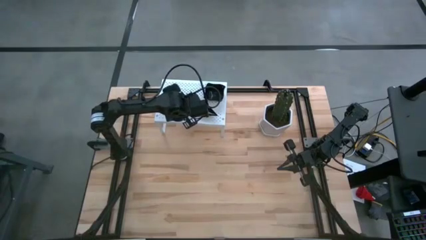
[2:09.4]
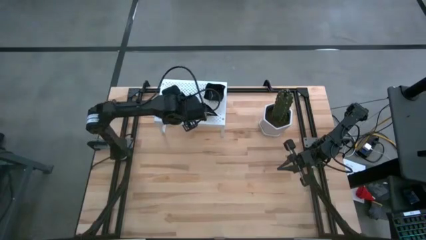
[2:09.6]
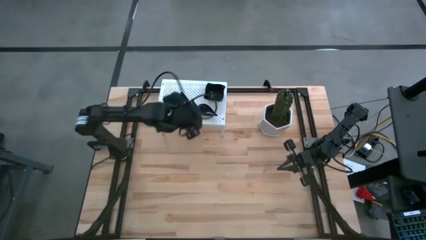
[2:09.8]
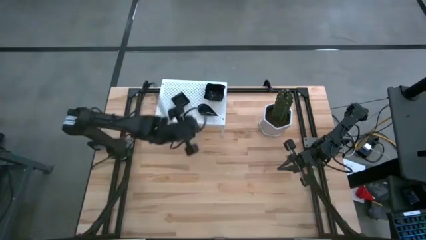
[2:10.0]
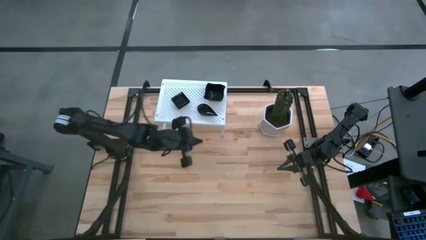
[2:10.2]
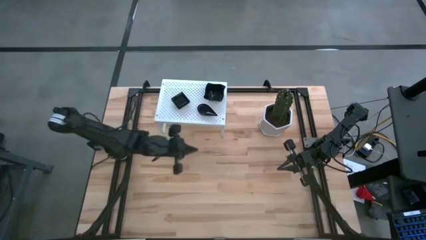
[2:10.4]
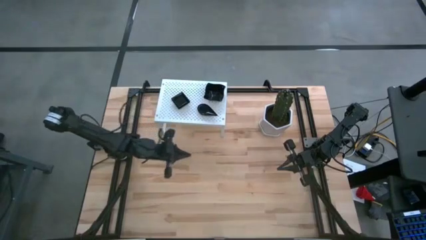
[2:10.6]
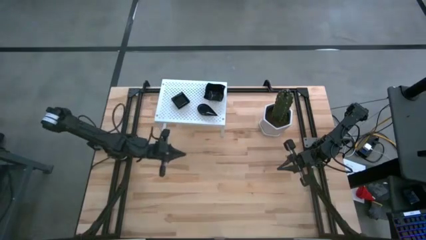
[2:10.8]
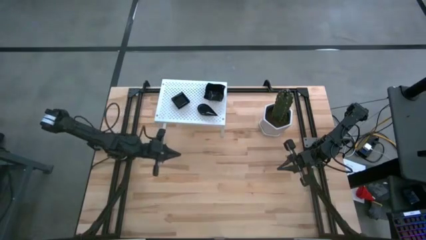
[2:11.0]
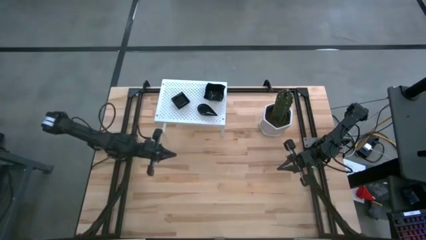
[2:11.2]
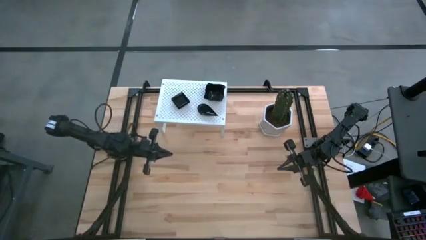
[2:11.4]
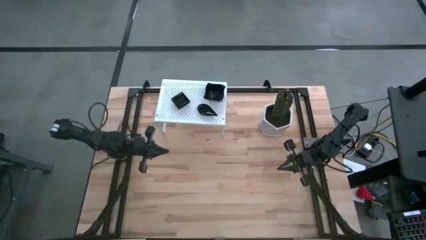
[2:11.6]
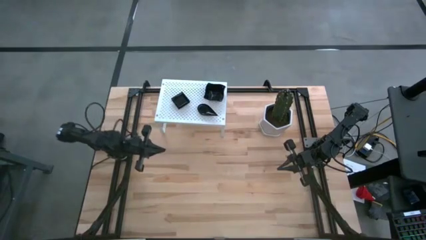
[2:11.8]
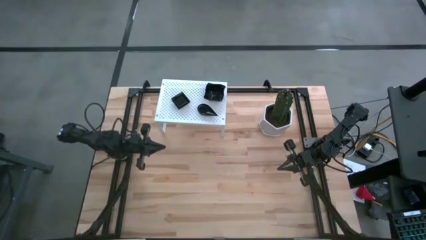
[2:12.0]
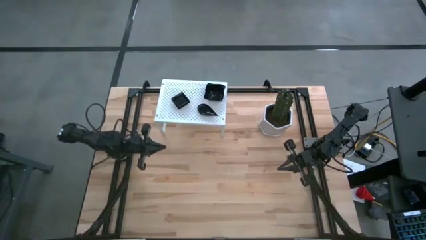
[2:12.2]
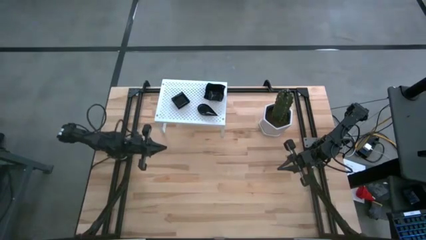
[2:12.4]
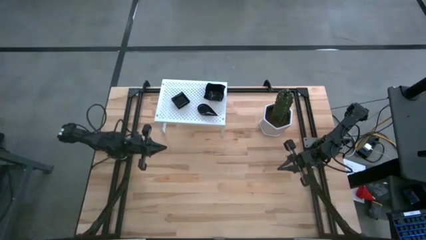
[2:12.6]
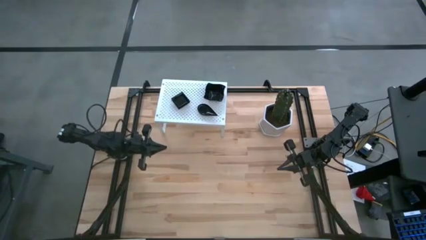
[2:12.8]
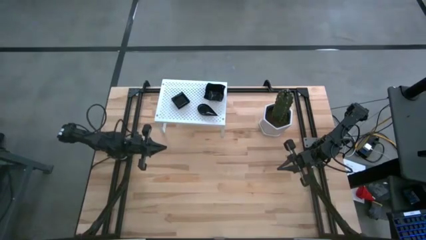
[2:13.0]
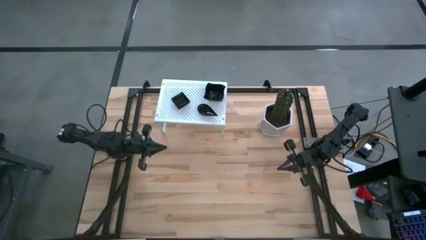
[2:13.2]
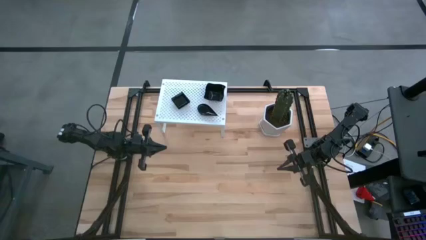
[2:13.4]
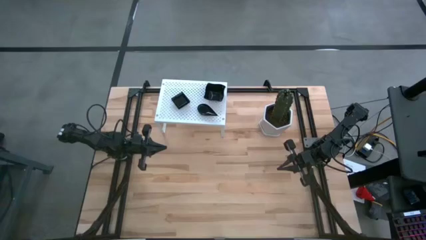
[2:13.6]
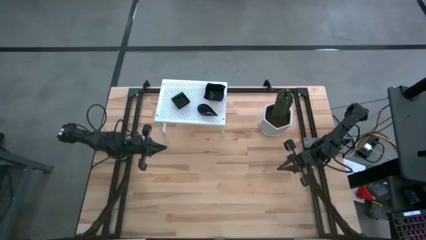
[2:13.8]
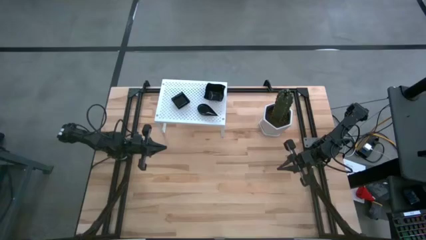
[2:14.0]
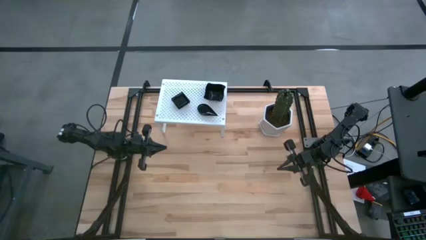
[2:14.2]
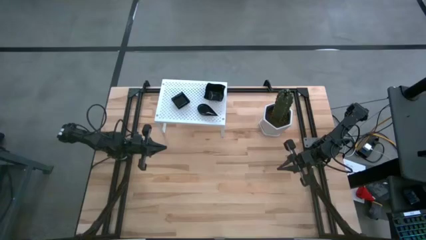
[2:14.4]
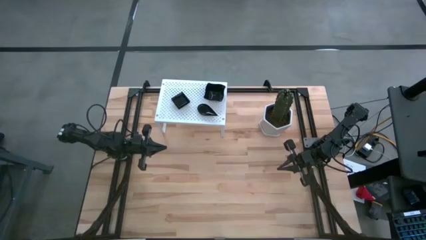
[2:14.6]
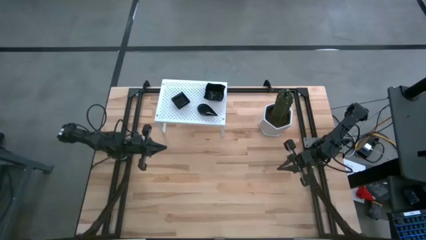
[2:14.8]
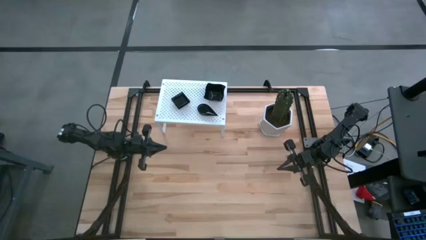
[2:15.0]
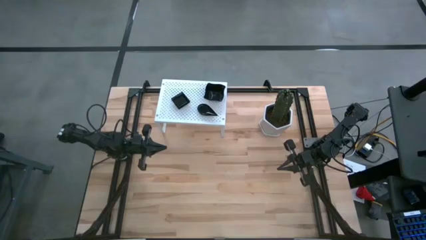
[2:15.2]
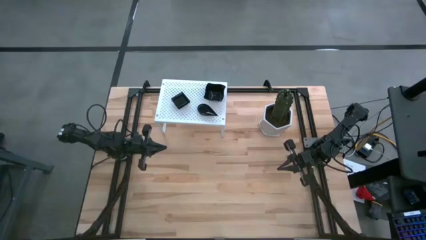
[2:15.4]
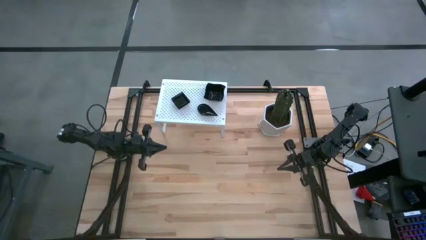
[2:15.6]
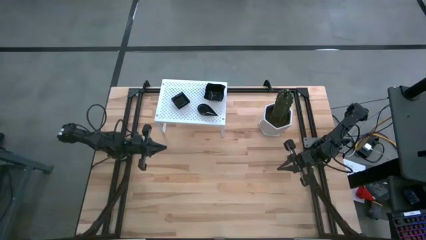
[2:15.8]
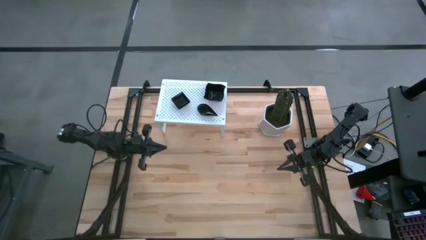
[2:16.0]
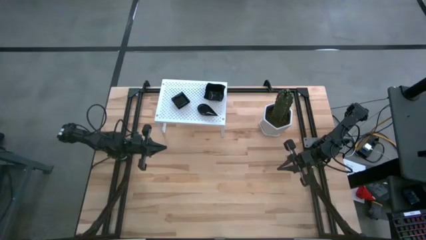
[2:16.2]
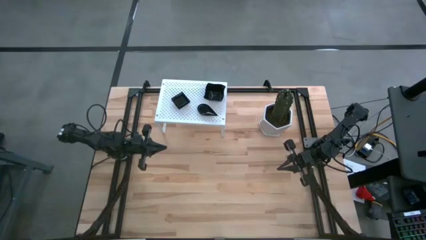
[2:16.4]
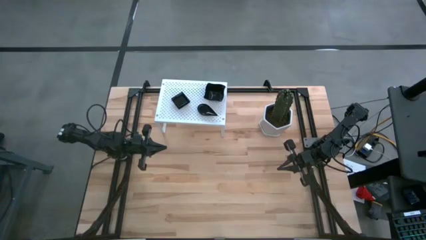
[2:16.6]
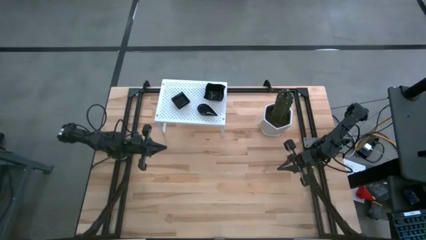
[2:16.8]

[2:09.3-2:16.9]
Task: Pick & Place Mini shaped plates
Return to Home Position

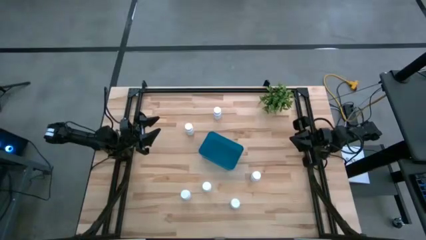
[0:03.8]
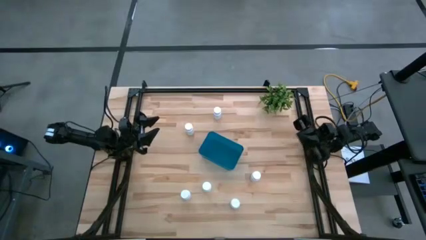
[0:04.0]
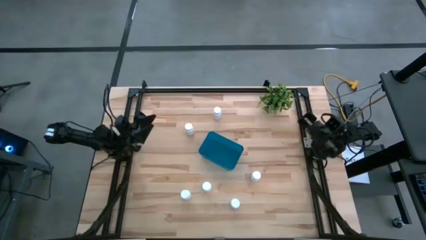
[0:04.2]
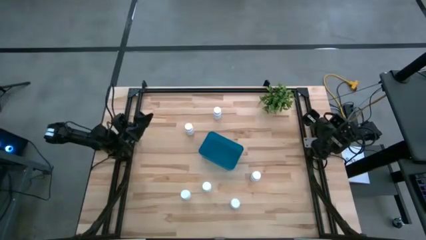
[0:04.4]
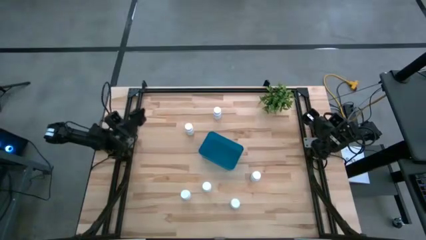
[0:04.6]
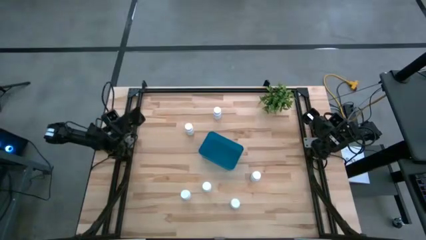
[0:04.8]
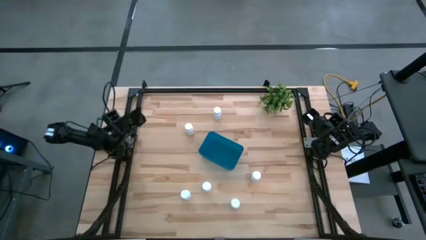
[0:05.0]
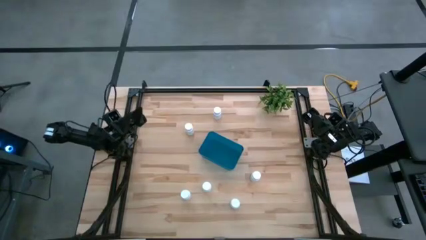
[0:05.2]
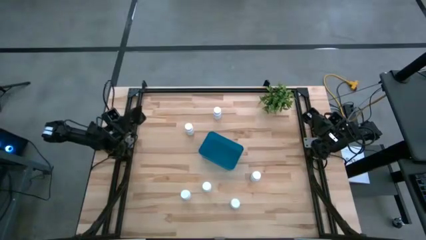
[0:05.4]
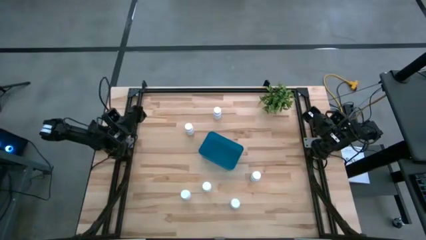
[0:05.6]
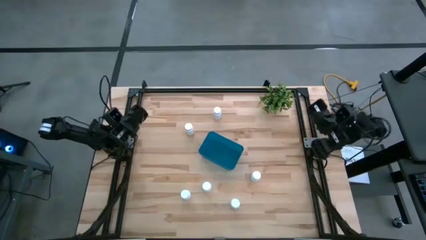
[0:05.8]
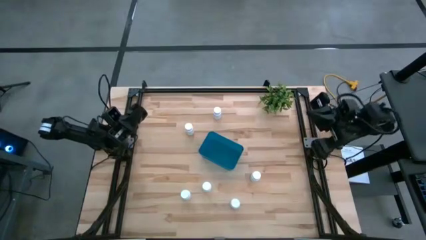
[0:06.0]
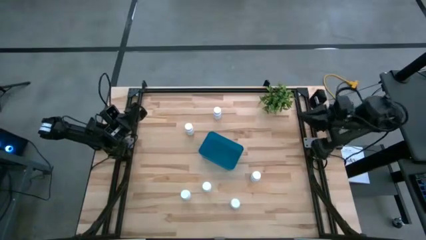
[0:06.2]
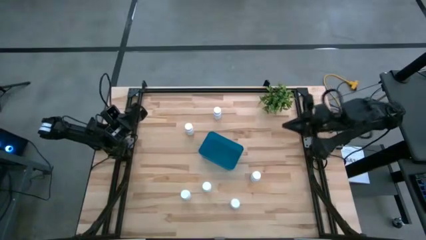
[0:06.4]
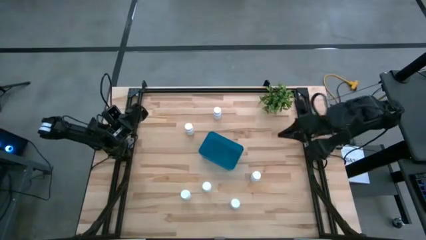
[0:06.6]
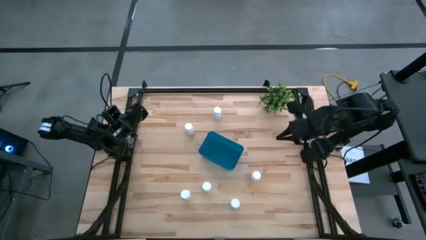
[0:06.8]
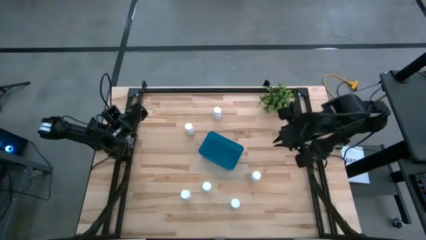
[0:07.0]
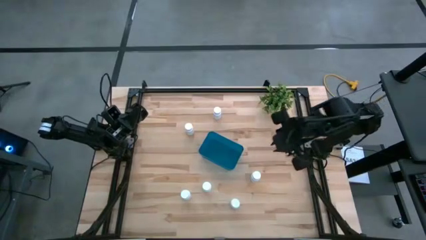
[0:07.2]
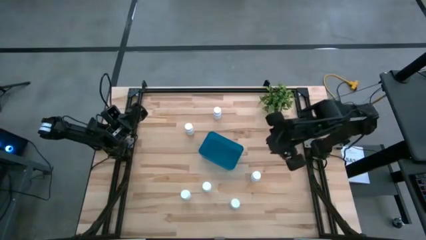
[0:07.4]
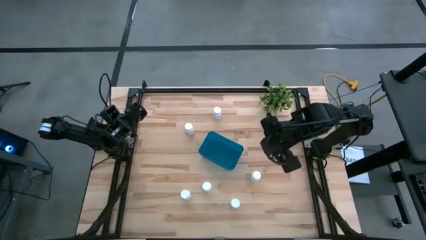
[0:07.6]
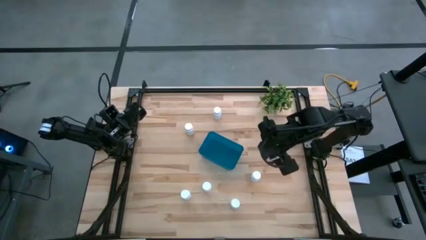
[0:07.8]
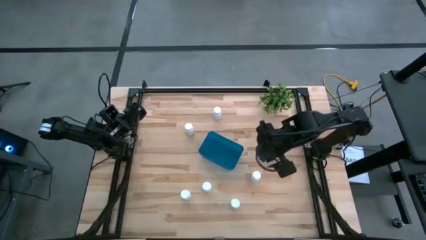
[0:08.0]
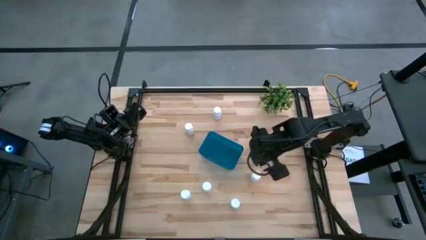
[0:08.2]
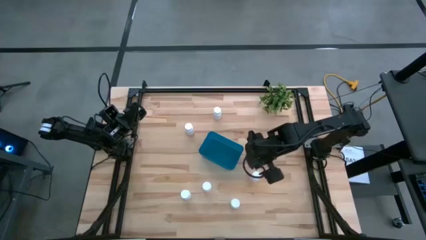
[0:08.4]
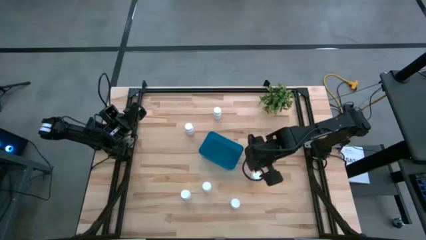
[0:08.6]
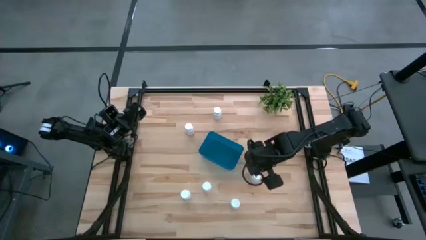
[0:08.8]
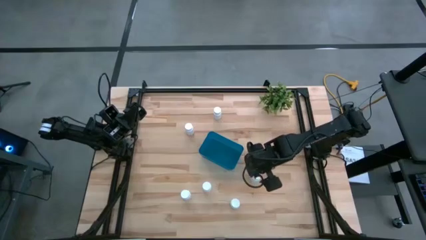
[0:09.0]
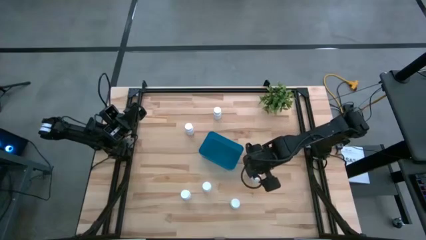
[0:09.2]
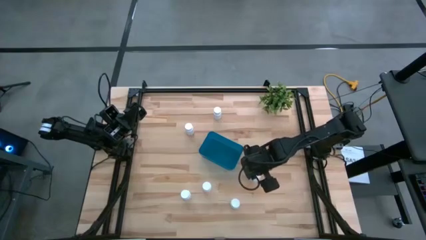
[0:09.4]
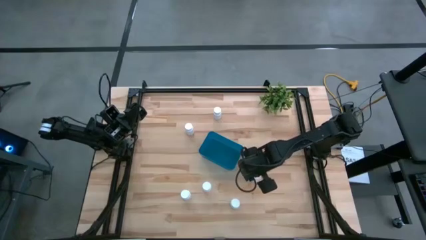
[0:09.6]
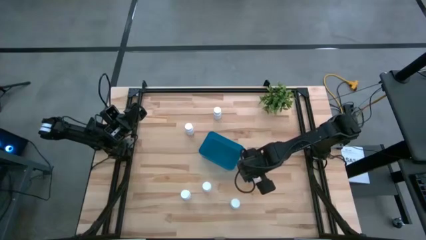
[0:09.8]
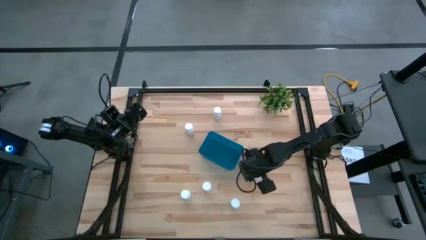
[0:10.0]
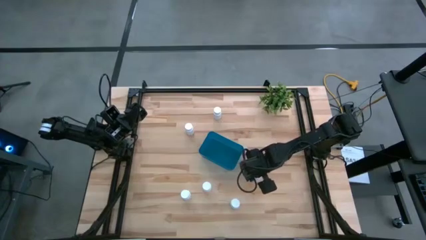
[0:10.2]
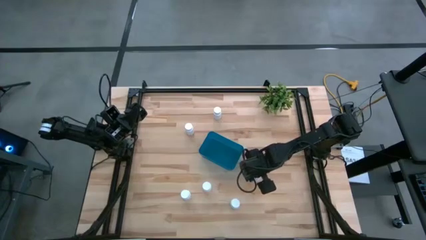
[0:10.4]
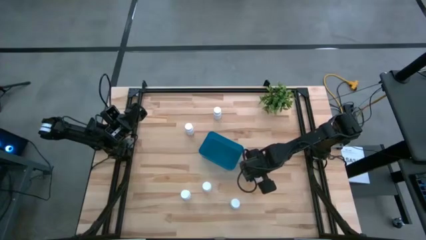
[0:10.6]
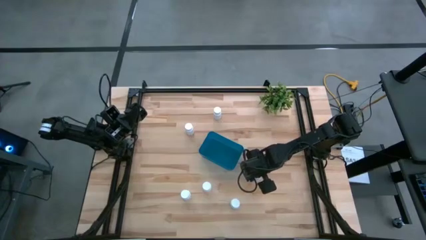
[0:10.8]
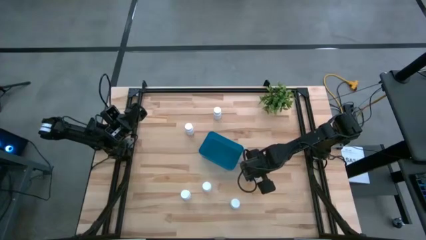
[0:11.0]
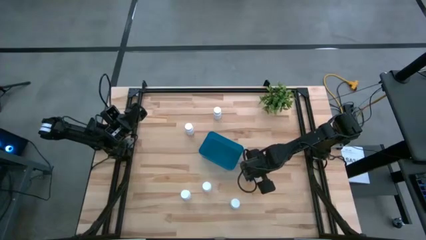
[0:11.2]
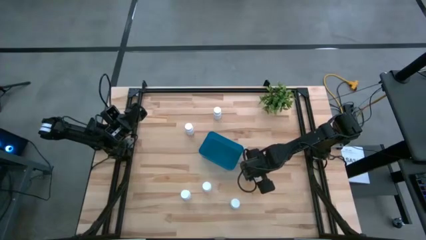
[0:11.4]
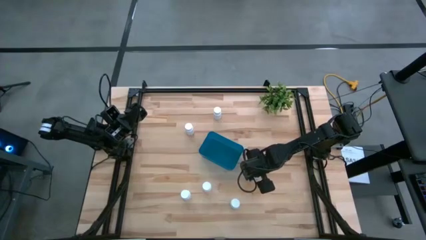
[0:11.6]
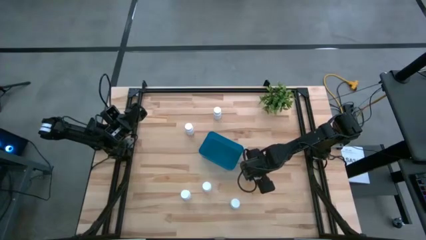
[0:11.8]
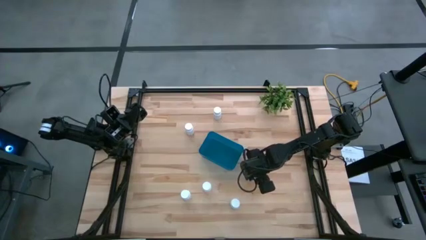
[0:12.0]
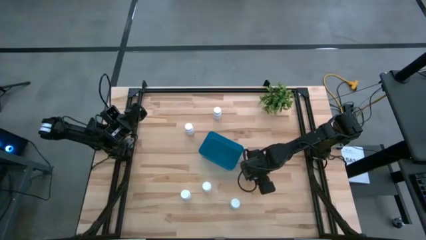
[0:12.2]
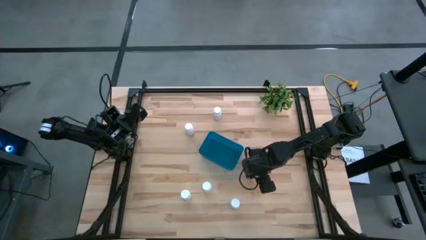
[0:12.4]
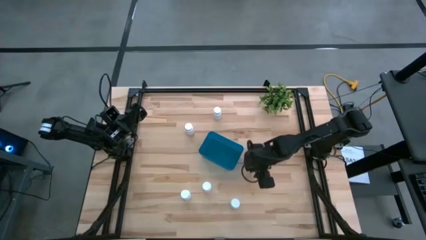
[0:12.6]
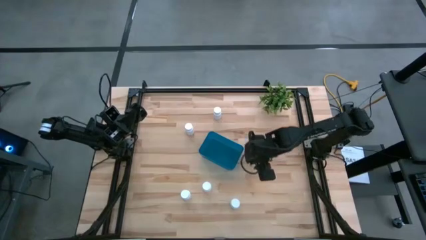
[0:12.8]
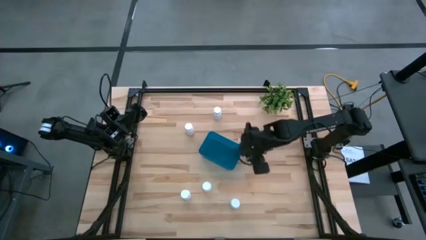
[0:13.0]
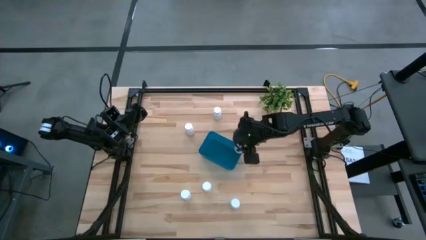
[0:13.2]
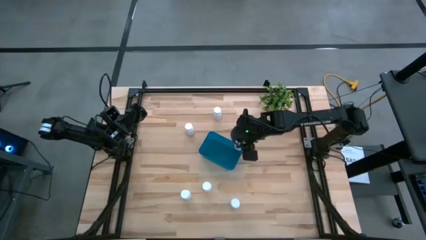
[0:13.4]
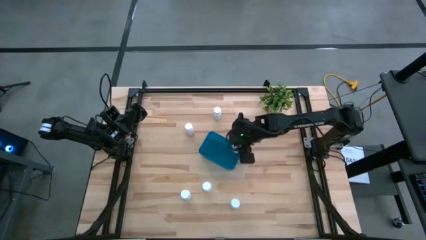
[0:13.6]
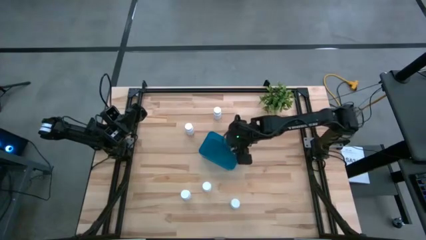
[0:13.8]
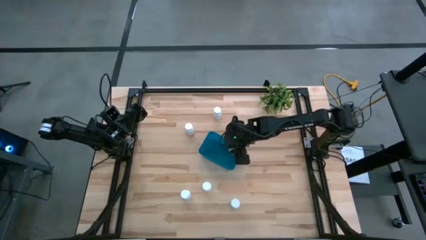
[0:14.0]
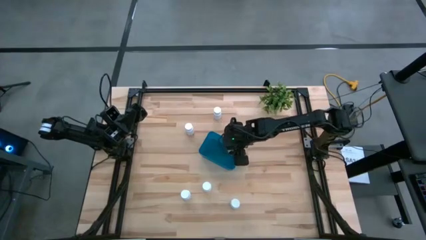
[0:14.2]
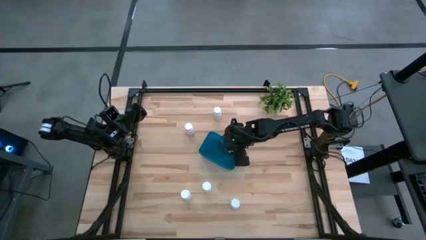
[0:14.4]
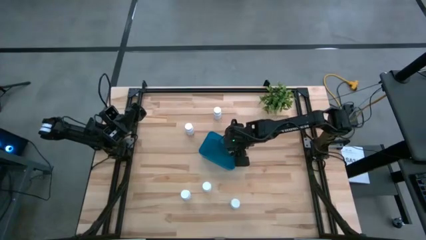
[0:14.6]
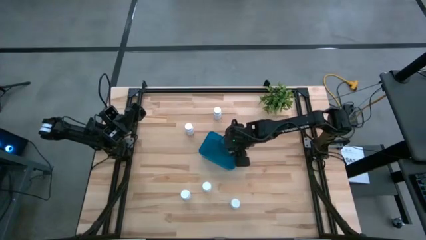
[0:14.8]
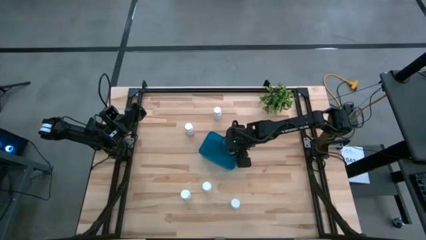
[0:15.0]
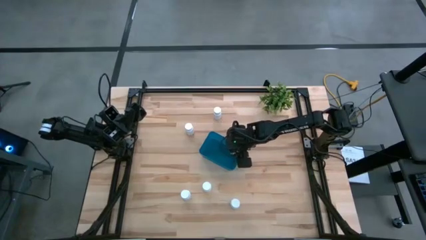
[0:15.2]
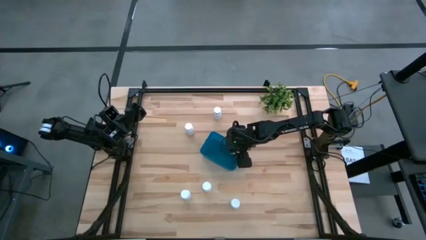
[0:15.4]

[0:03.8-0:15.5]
Task: Pick and place pill bottles into a basket
Put the white pill bottle into the blue bin
